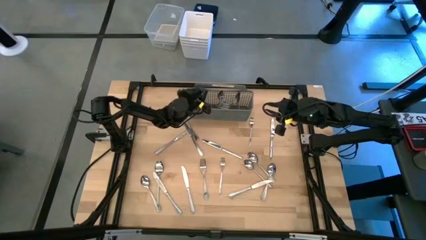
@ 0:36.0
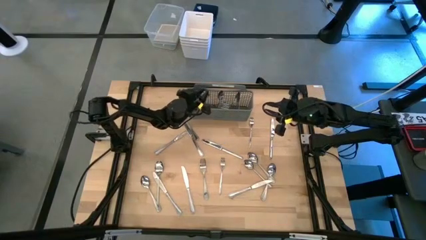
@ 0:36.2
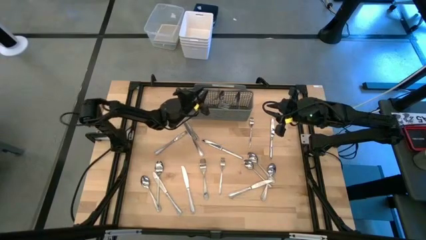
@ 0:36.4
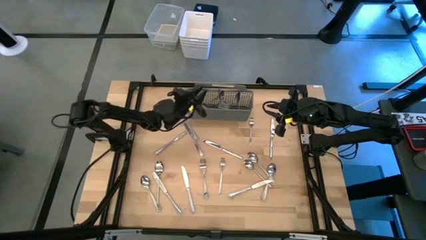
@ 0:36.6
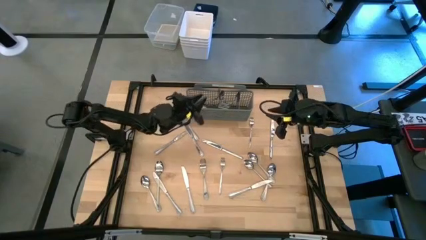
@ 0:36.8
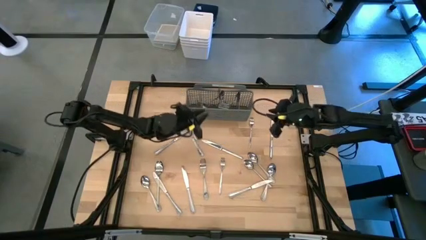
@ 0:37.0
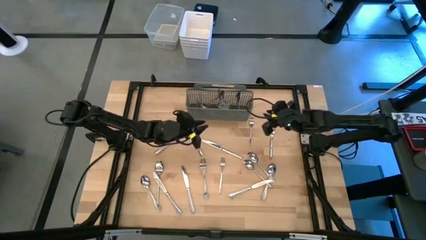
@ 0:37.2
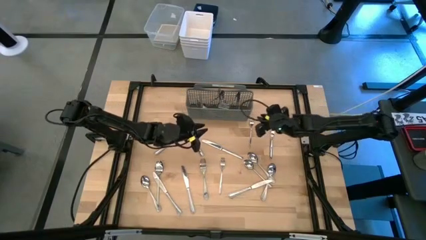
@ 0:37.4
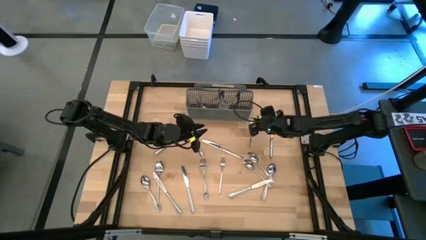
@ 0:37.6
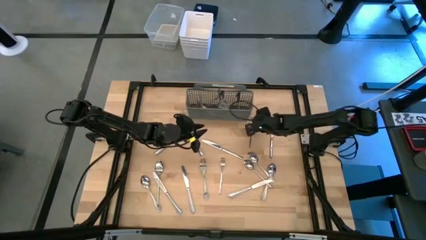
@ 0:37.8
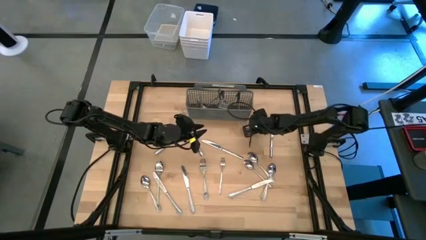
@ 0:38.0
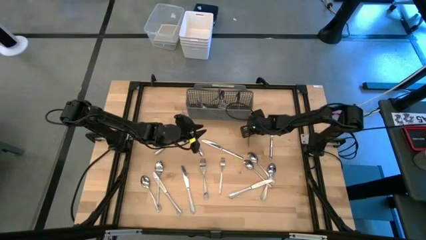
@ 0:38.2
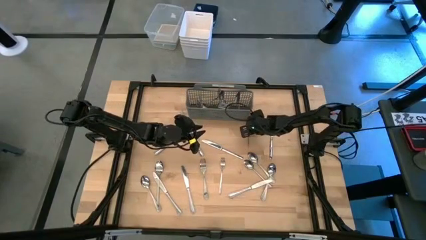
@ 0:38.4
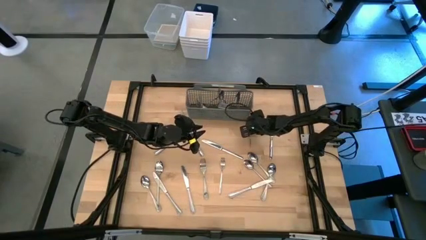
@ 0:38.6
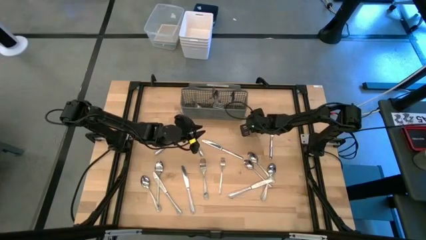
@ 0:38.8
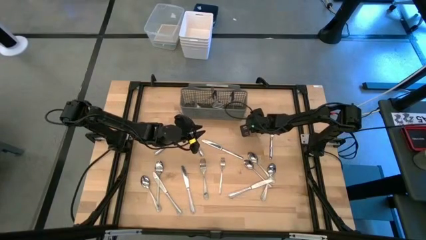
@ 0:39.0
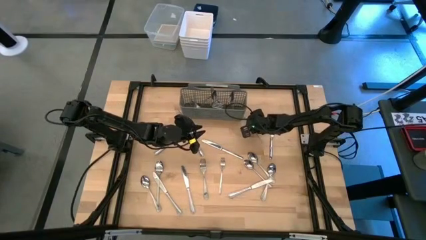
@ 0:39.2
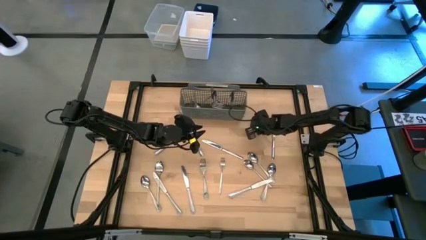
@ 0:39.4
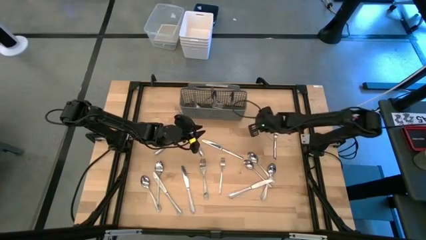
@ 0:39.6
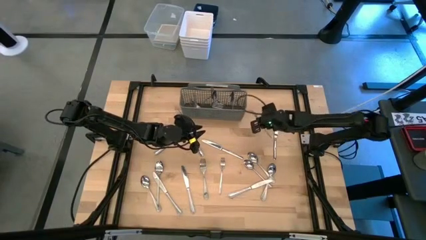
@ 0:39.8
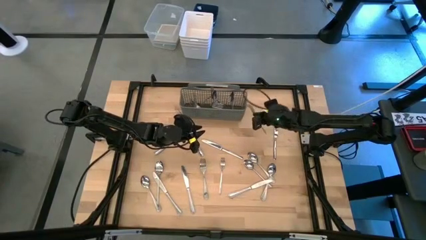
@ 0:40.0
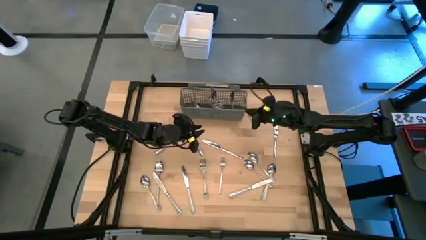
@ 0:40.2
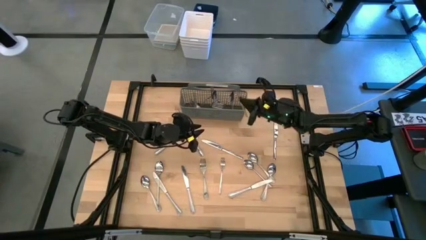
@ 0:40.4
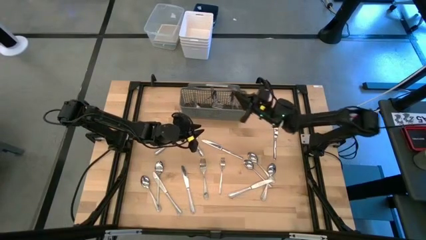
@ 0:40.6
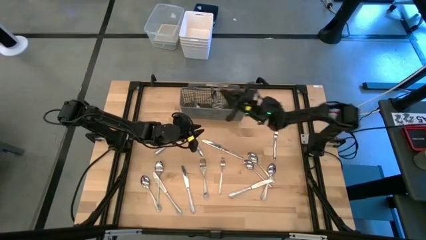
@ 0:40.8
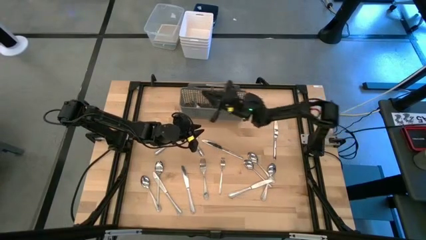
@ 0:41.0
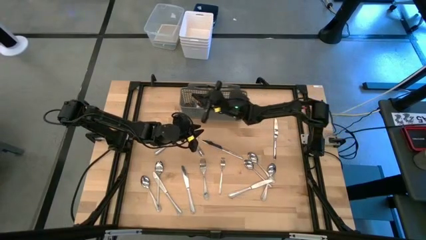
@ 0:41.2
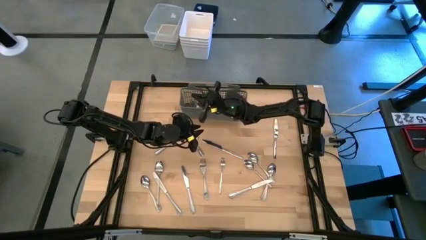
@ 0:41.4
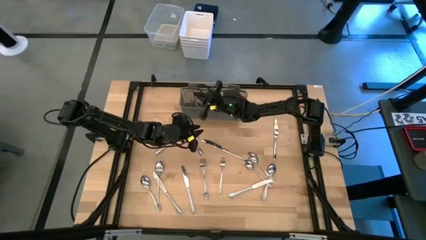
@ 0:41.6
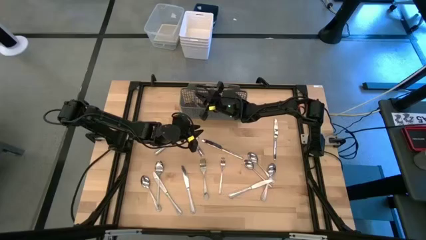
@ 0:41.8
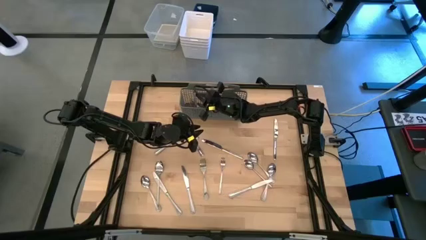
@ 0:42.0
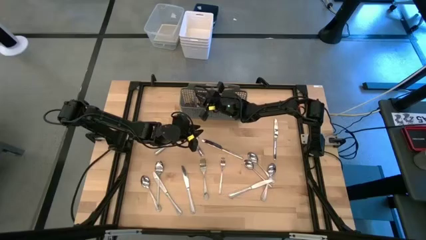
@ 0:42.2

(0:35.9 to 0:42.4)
Task: Sort silverware
Put the silver fork into the gray silverware organizer

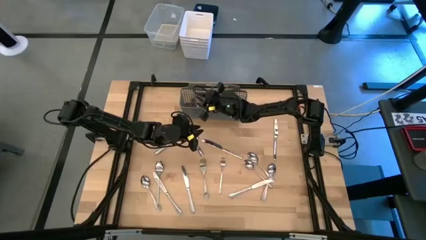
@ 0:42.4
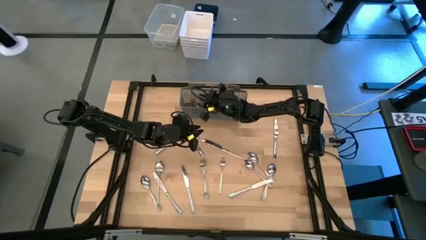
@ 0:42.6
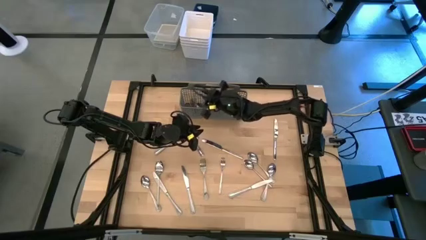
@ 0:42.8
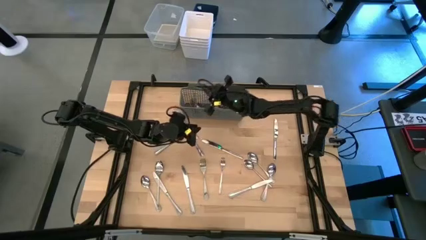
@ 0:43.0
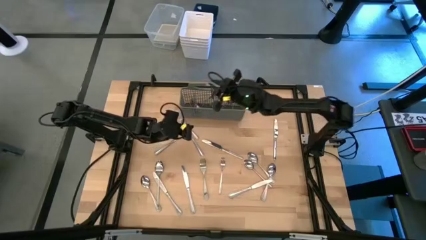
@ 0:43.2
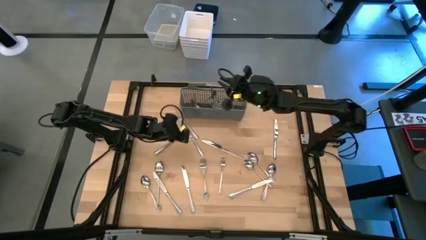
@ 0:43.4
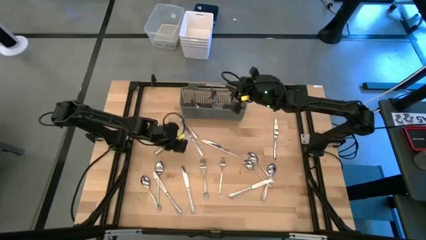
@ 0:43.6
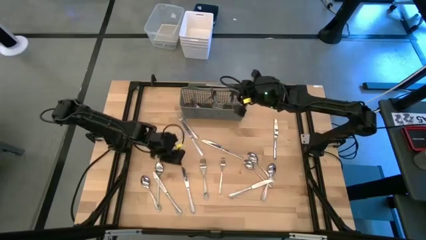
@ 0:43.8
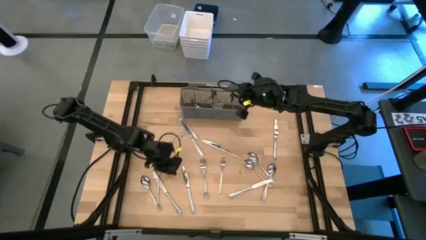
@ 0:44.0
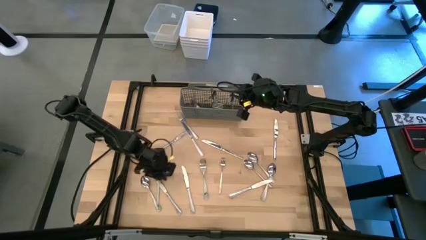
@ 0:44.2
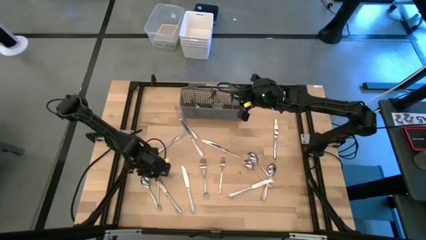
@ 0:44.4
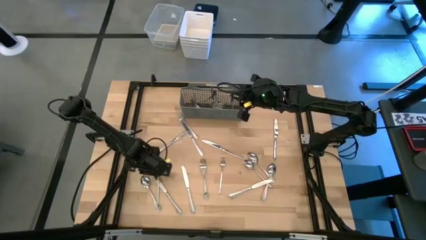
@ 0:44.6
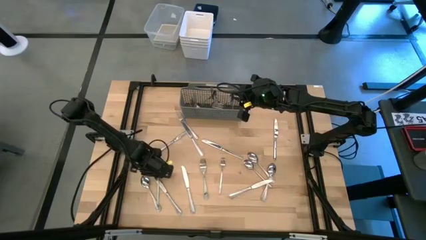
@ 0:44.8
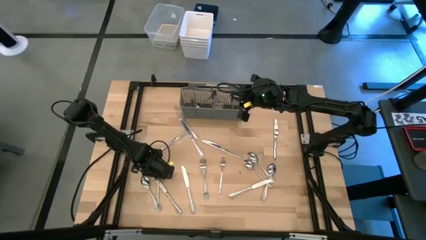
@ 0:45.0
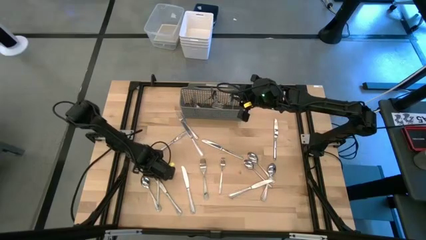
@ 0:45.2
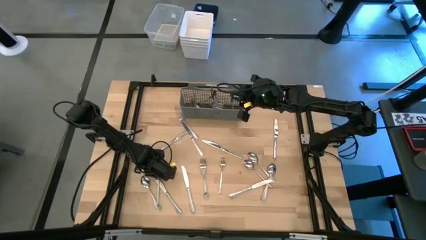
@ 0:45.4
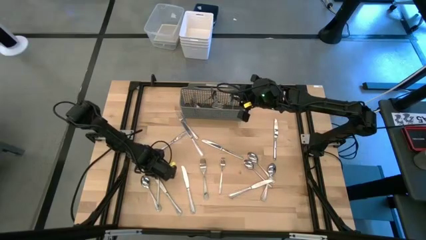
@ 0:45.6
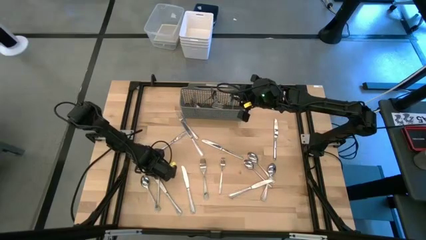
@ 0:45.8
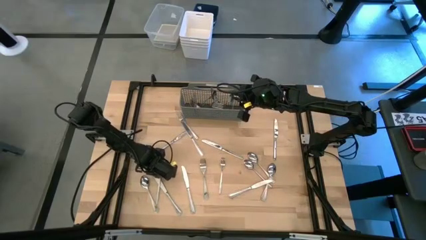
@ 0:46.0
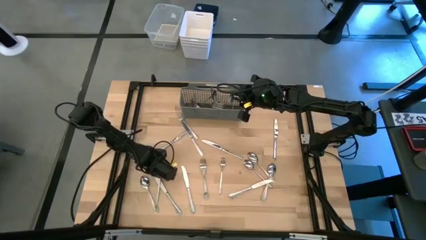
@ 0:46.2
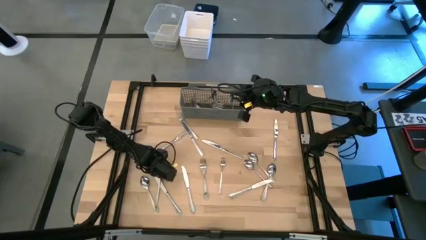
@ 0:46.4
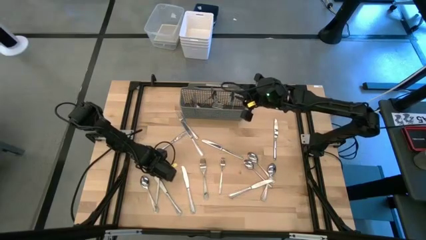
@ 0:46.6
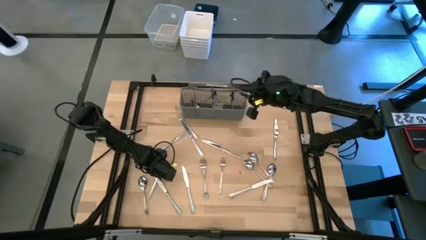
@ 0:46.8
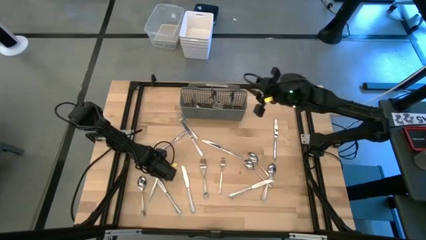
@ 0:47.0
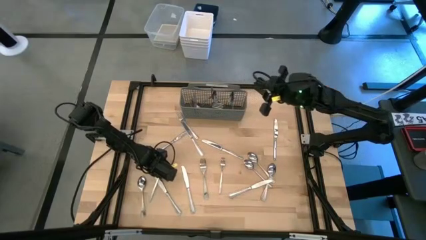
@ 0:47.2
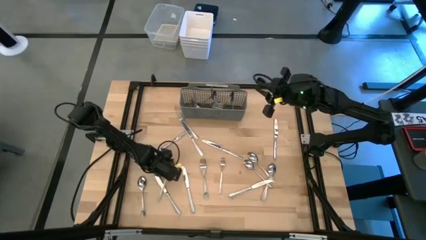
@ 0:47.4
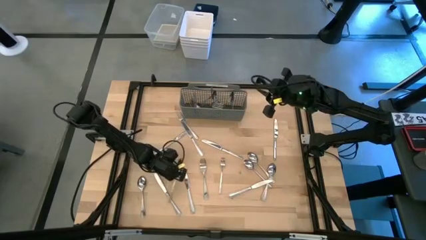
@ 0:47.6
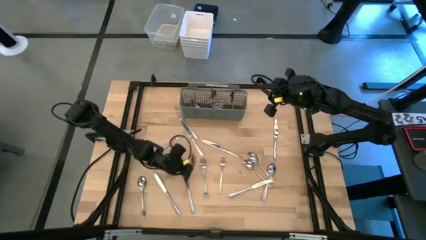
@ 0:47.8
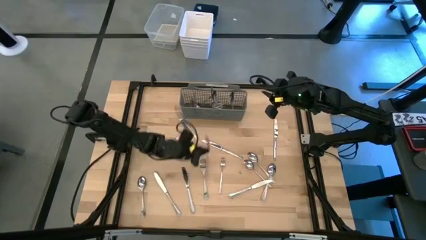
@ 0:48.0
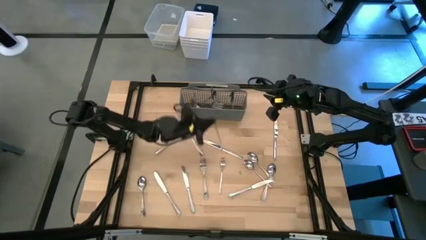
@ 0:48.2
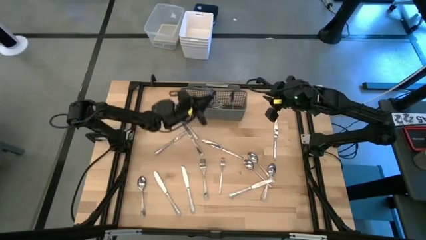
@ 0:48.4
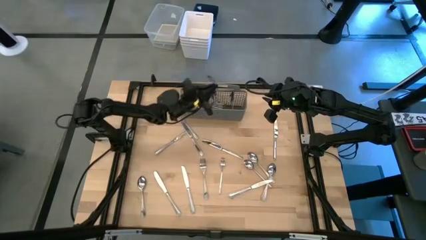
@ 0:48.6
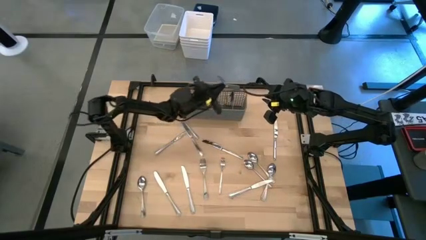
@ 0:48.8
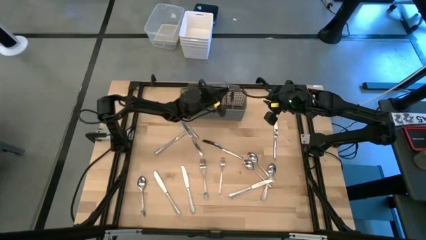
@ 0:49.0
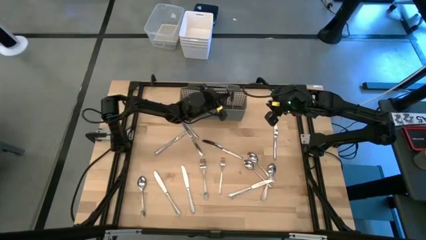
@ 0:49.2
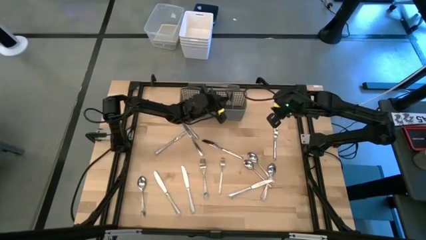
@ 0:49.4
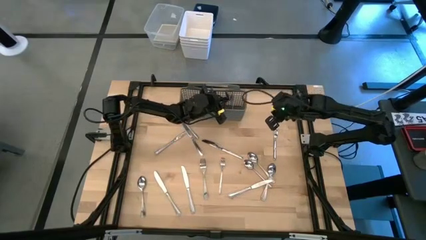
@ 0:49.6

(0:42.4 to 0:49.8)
Put the silver spoon into the gray silverware organizer

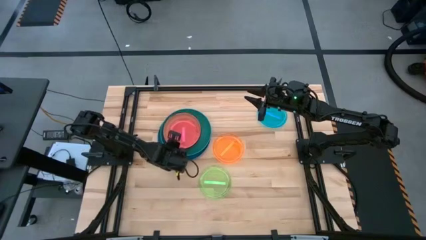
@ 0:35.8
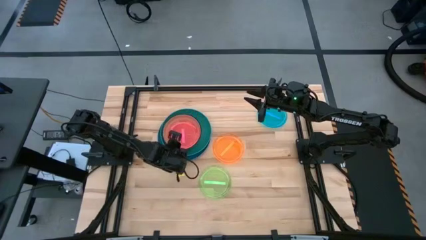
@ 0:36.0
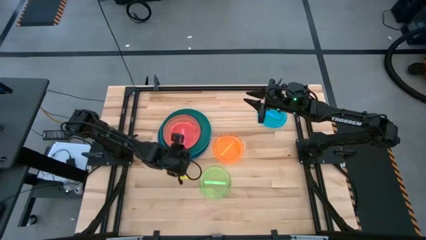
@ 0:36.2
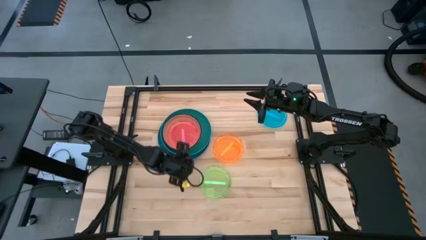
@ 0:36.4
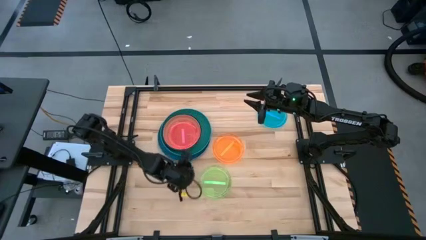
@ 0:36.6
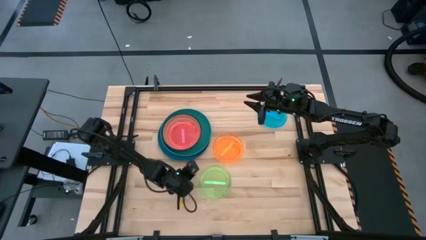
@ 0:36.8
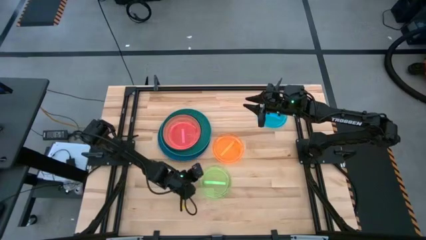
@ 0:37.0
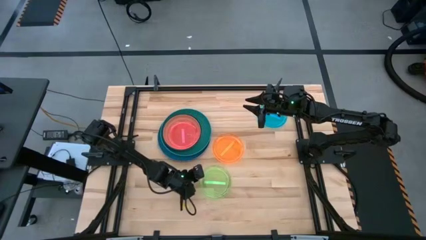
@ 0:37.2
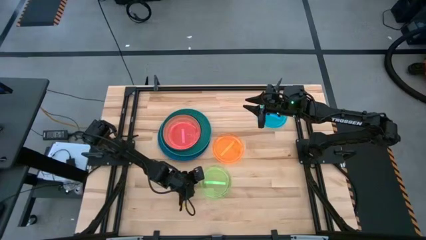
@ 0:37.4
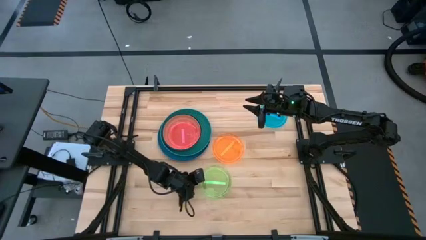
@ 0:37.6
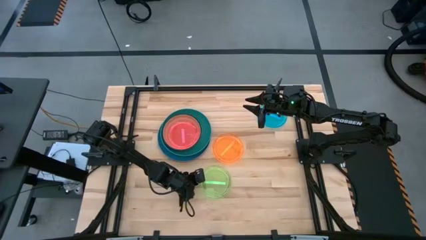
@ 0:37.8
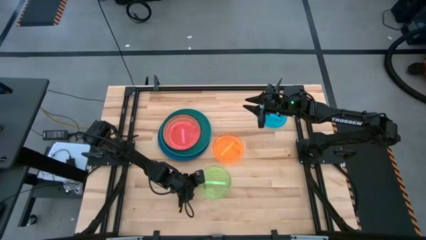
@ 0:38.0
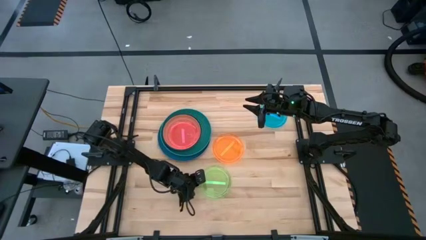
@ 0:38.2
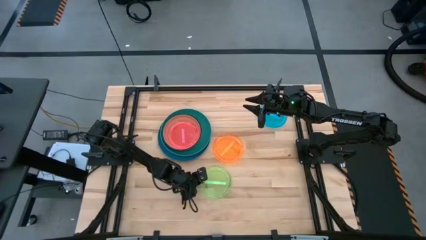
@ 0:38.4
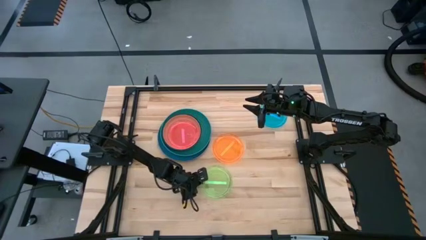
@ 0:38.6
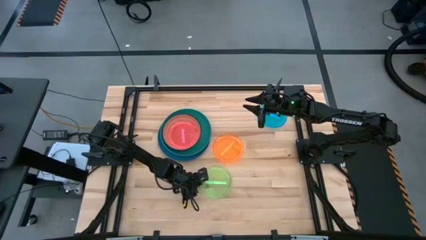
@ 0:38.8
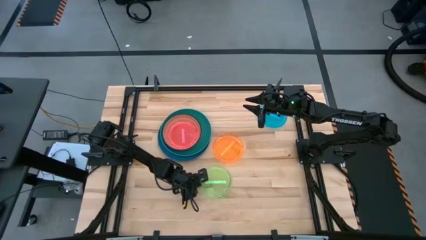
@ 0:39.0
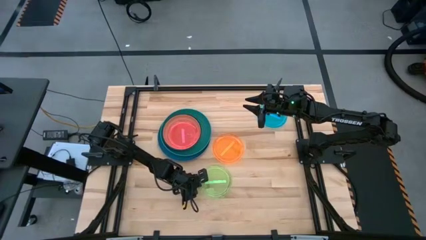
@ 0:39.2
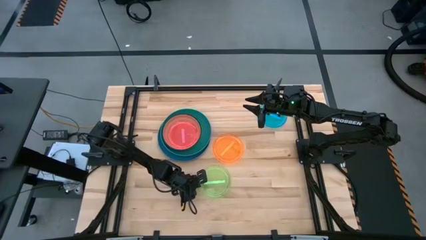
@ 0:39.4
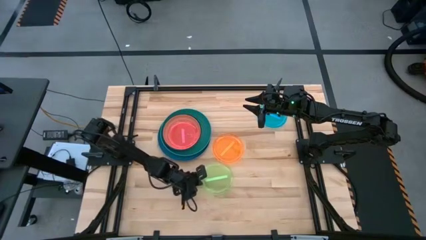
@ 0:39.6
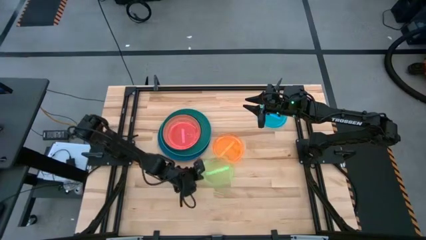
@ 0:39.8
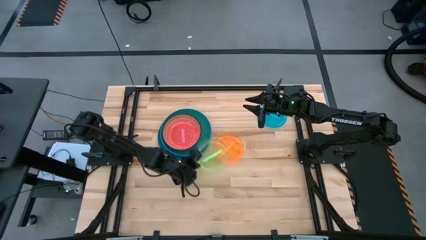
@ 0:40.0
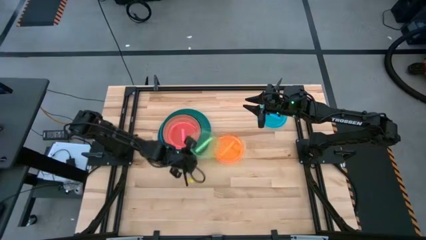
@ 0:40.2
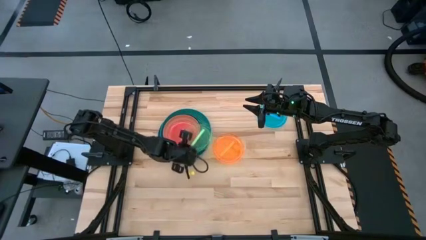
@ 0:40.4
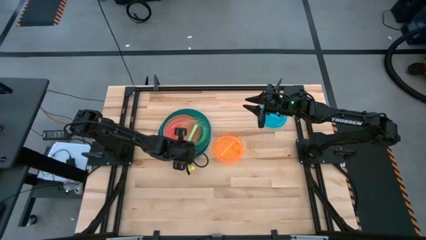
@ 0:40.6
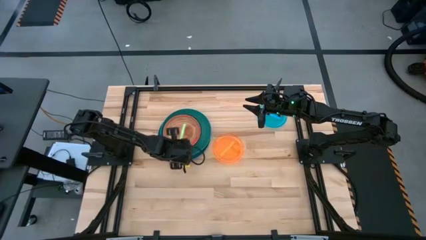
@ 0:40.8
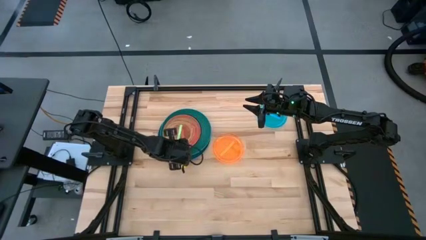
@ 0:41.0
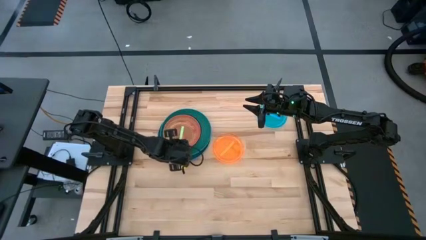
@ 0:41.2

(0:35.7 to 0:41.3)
Task: Stack plastic plates
Stack the transparent green plate on the transparent pink plate
